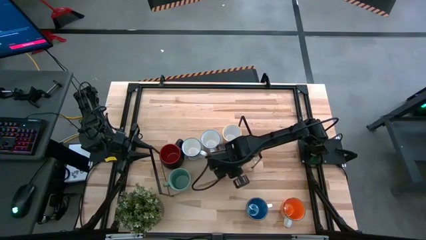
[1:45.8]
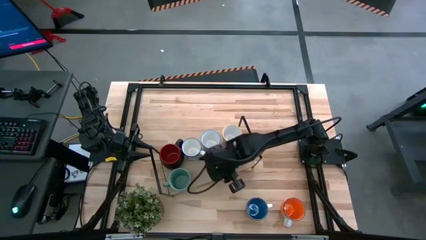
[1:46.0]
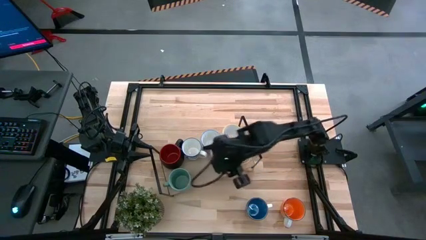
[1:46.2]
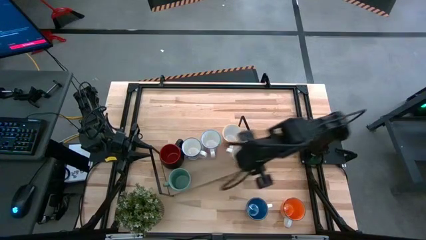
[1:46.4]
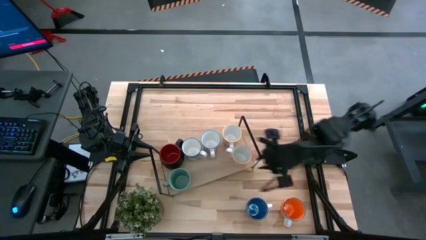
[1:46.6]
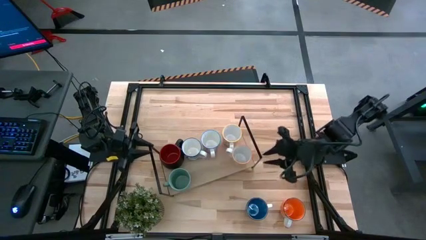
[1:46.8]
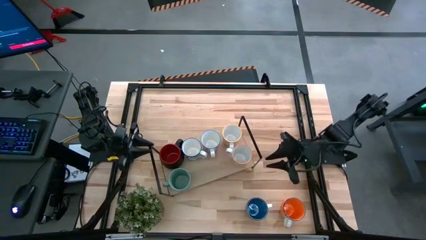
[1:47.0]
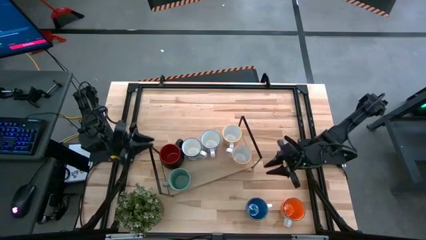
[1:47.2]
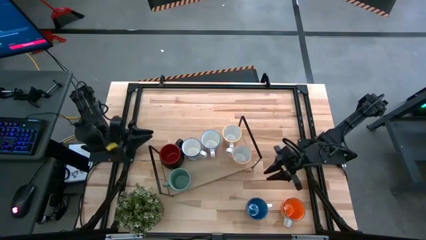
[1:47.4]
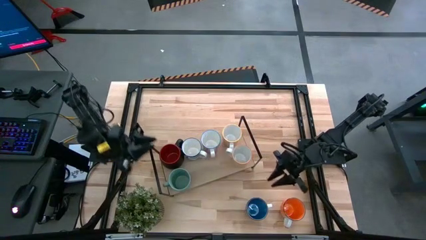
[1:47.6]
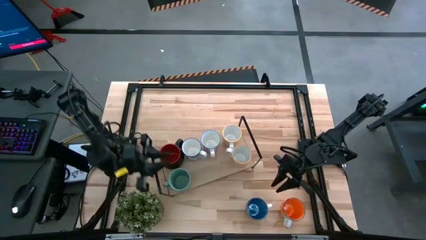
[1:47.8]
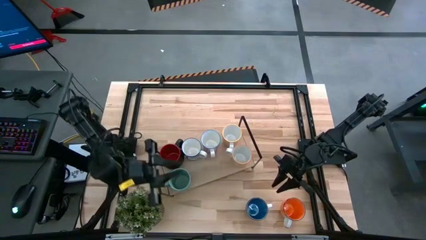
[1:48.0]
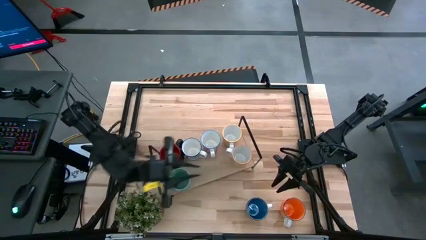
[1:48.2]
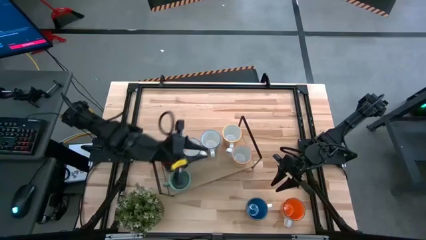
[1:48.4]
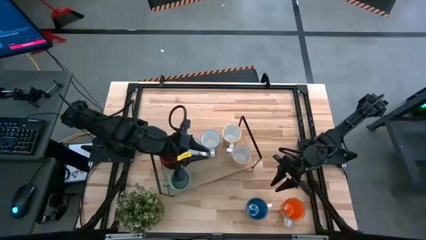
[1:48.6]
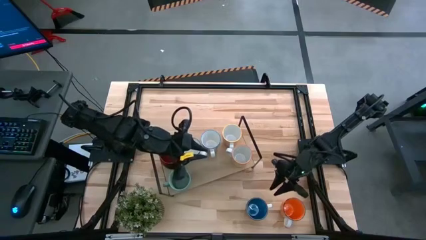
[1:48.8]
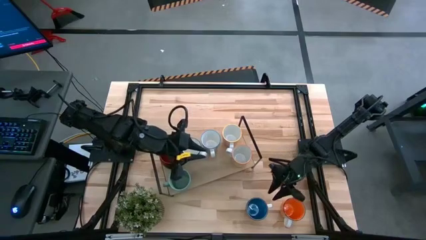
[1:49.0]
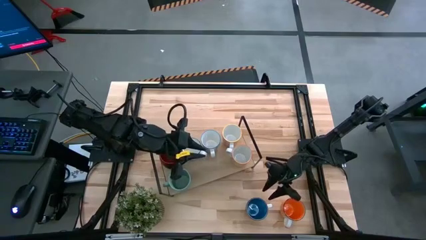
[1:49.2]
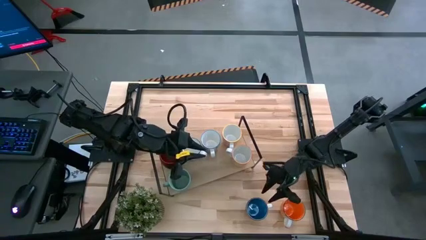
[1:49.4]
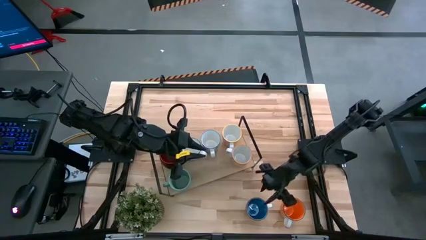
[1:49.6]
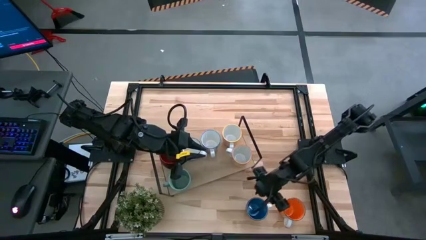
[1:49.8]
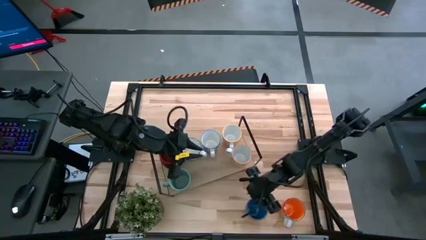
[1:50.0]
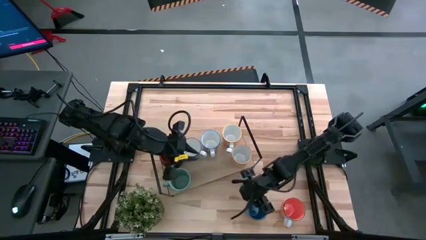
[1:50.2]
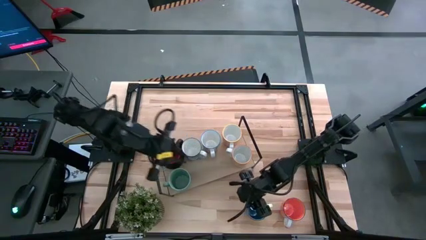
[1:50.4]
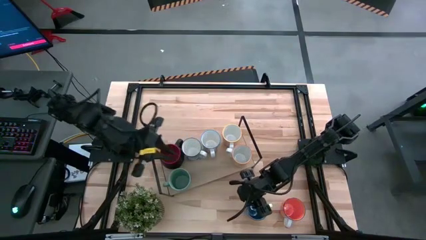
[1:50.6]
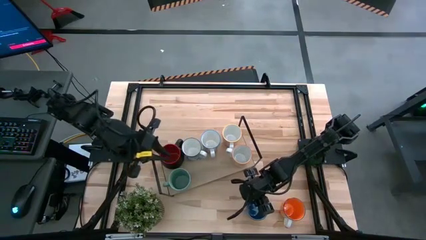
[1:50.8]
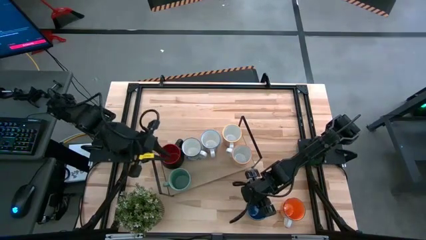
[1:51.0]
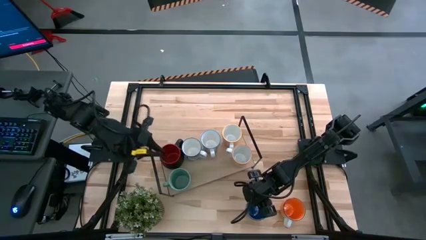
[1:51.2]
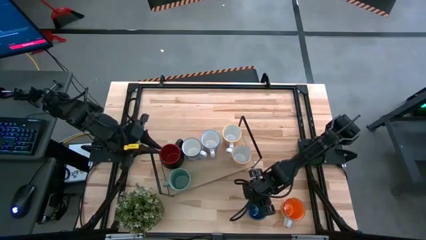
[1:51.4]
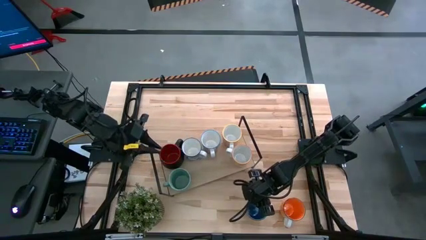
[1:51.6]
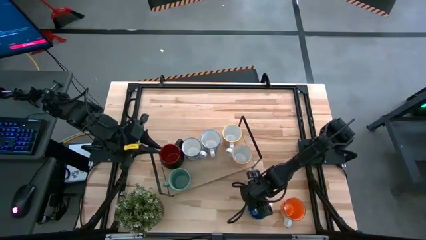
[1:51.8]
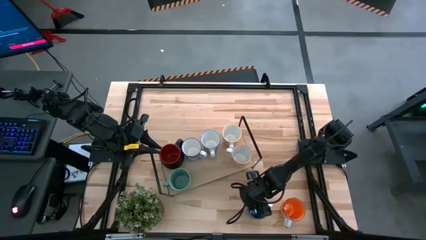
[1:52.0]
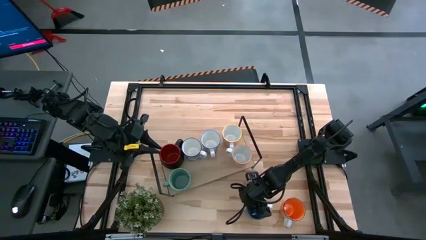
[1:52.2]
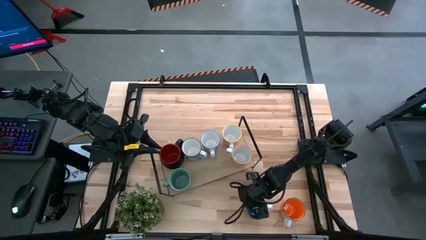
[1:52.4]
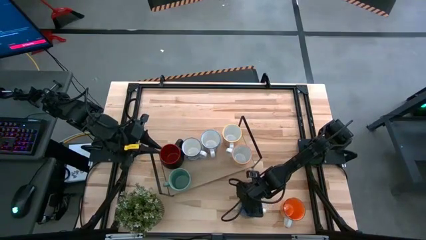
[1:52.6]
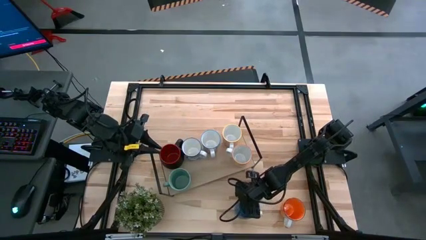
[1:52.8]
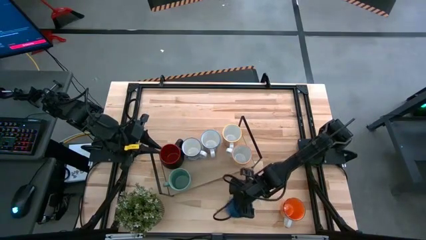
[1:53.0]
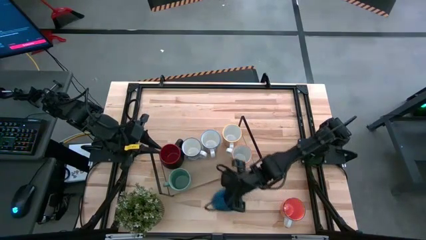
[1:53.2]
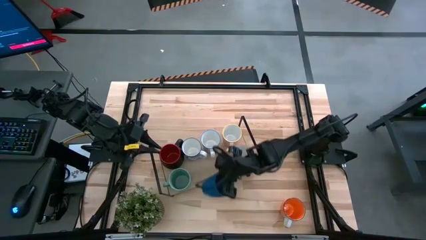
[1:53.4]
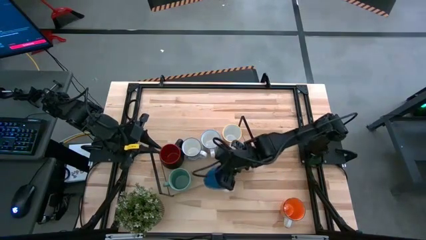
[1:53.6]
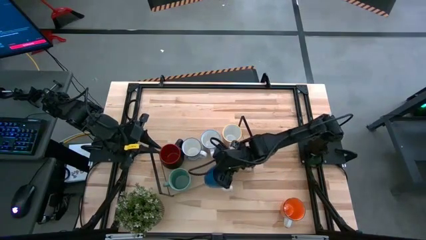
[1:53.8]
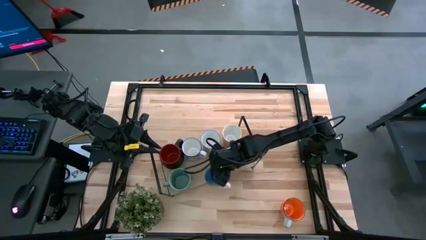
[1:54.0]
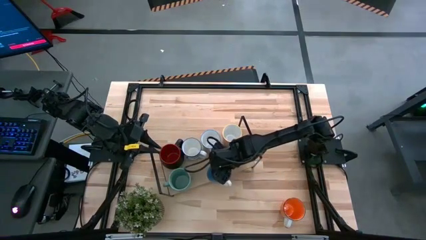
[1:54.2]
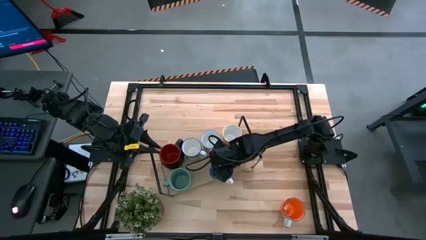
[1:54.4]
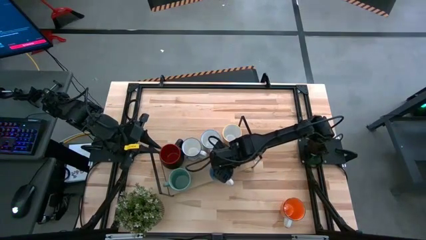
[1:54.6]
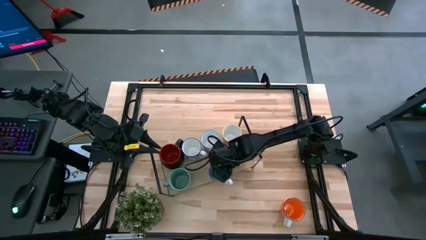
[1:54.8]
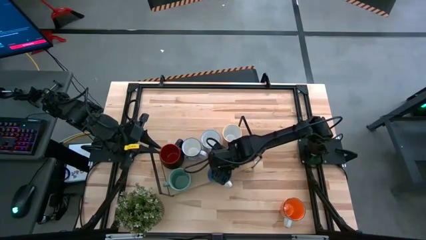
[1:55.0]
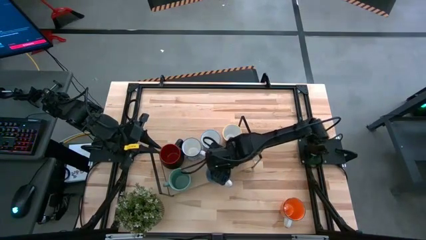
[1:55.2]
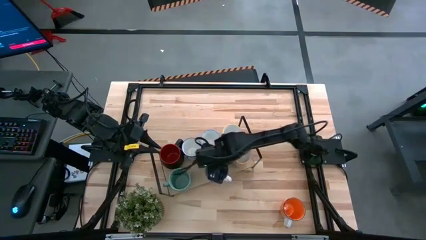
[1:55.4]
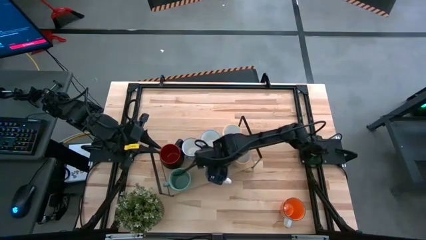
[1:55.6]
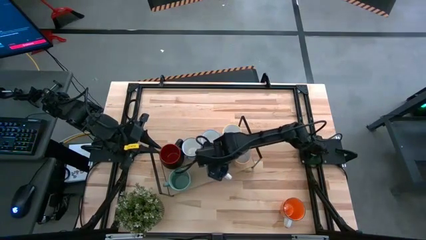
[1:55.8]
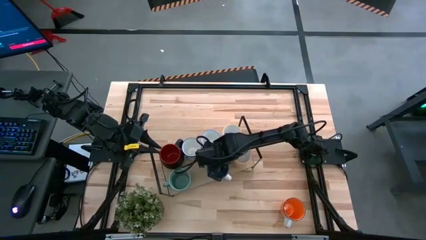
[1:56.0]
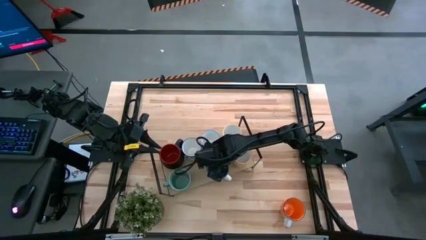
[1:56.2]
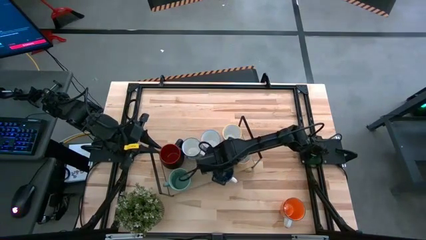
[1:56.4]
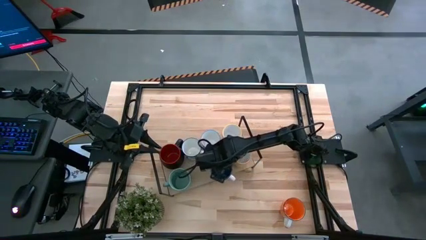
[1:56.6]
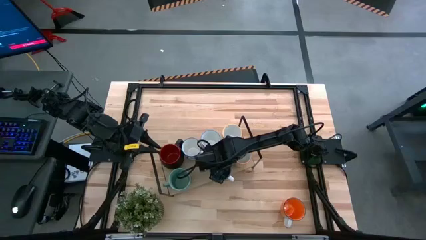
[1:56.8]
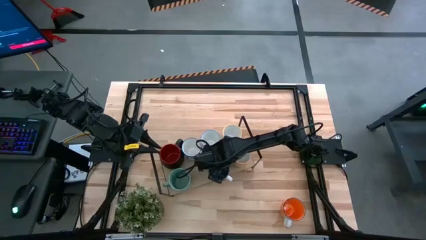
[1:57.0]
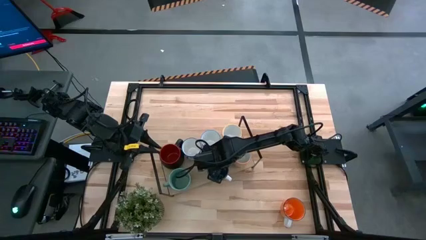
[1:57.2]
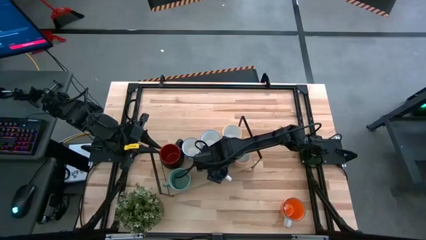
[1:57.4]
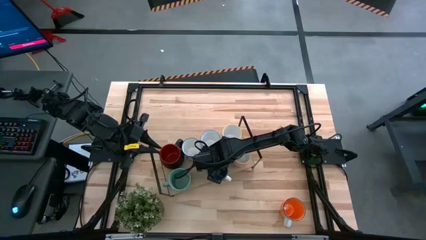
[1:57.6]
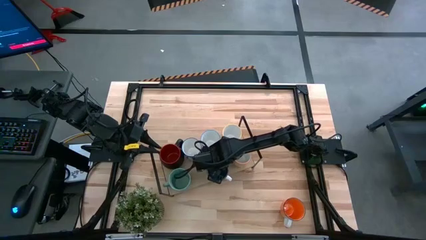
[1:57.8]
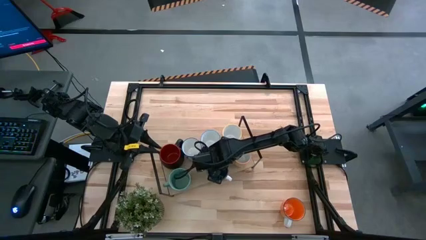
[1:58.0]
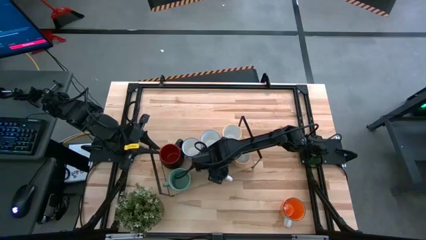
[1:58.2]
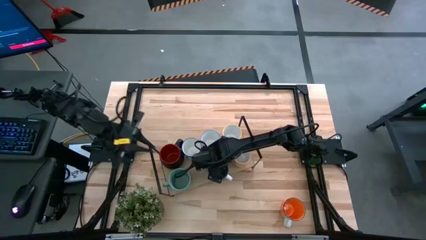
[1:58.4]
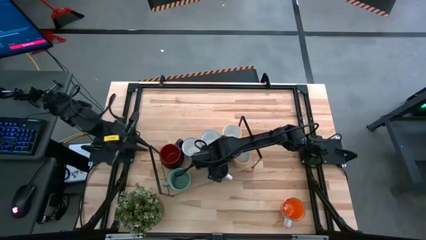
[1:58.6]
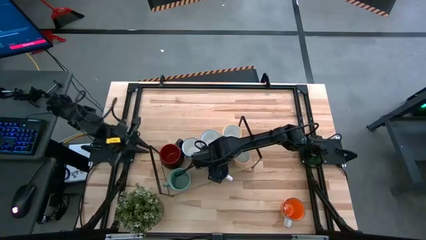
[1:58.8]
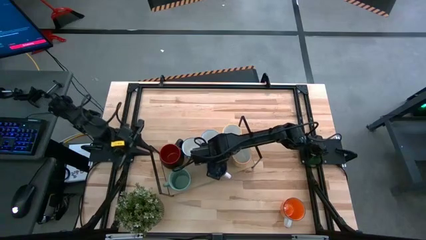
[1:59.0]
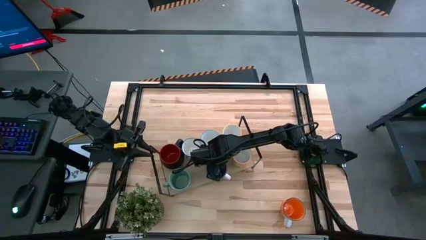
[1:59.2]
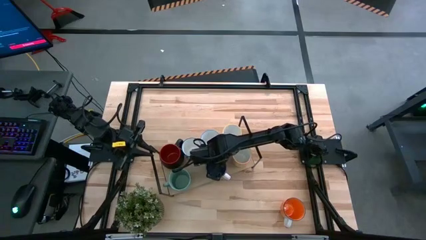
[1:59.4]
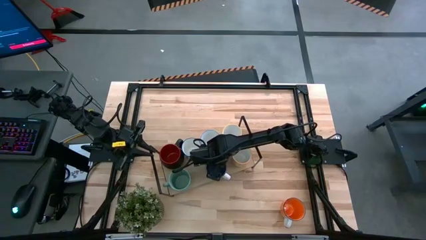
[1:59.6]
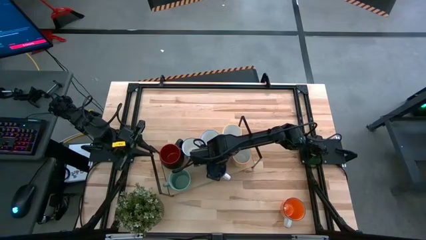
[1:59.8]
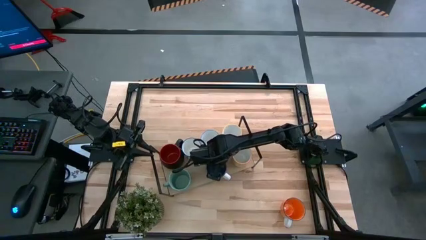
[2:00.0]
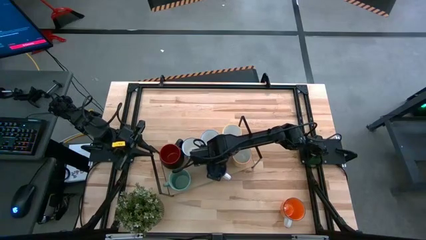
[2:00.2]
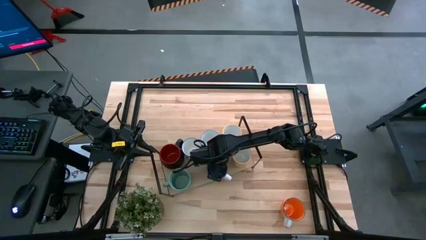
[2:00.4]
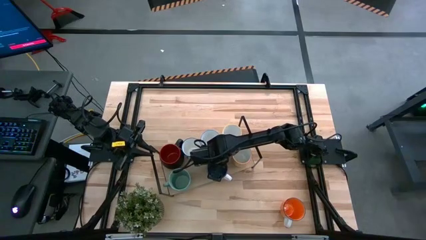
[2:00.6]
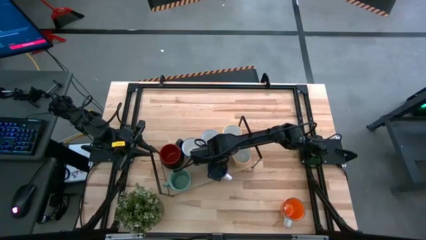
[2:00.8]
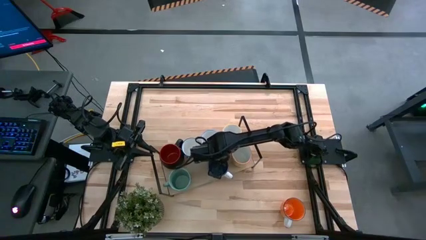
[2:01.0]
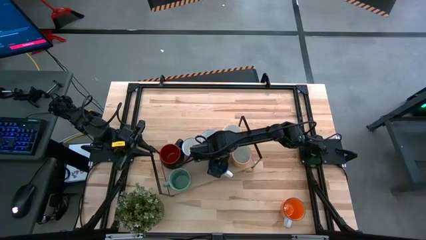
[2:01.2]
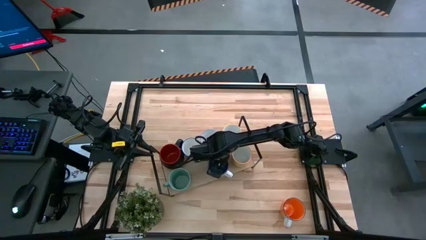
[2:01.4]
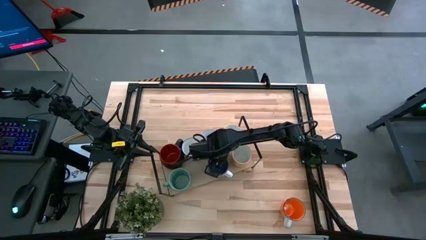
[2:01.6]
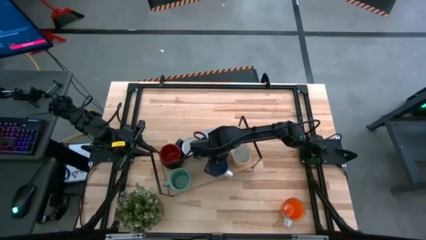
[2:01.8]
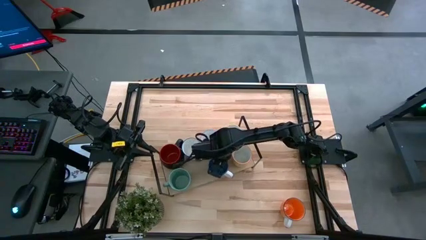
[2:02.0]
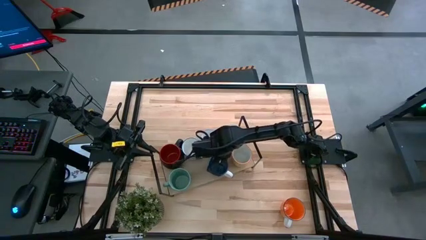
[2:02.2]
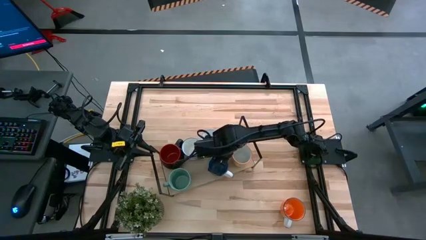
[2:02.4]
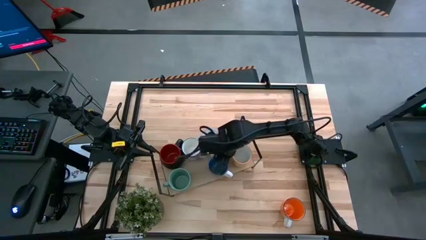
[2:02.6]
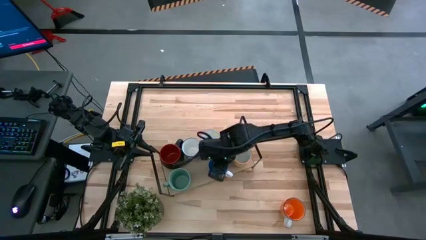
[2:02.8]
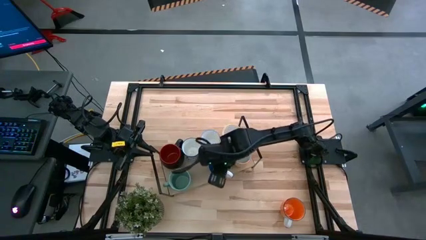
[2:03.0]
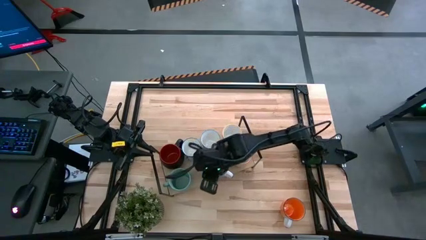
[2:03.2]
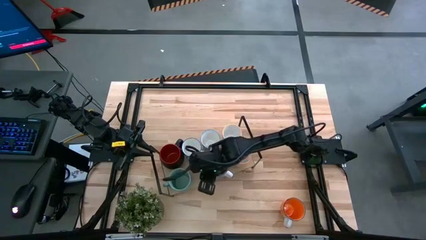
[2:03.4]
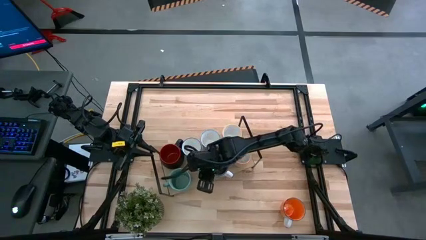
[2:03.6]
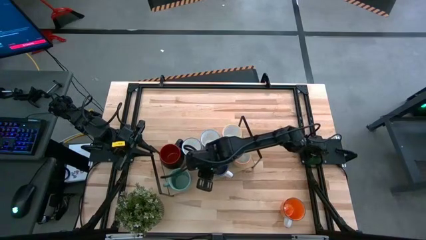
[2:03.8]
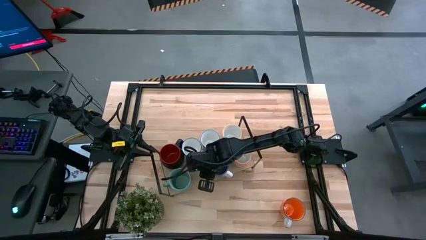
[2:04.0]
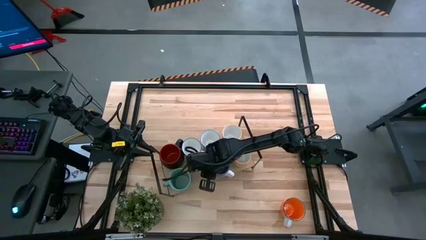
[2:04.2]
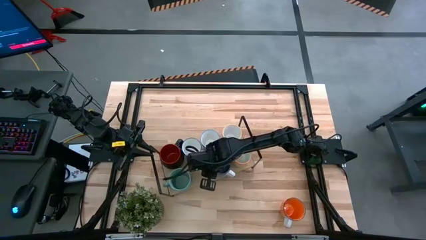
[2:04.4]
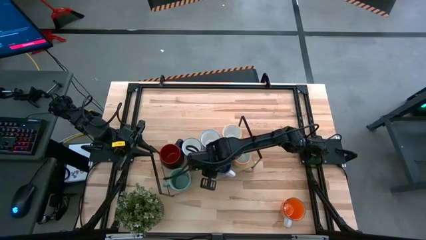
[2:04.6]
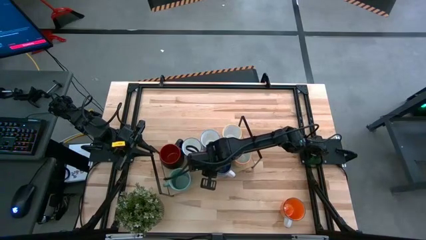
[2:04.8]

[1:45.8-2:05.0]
Task: Place coffee mugs
Put the blue mug on the shelf
